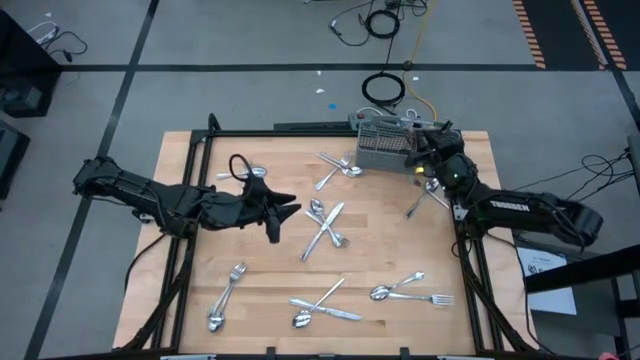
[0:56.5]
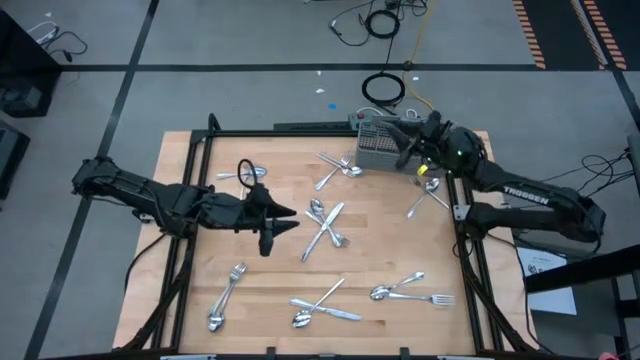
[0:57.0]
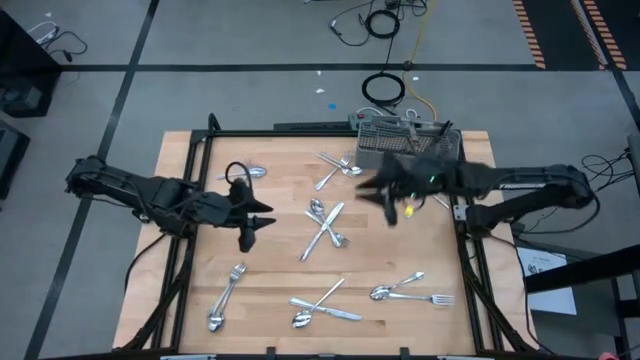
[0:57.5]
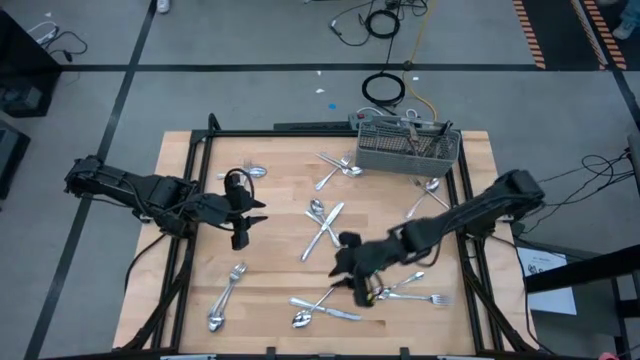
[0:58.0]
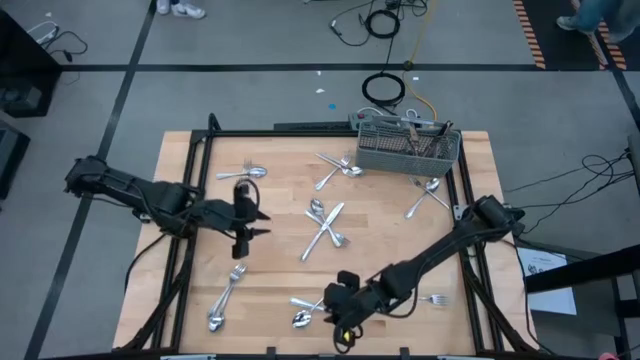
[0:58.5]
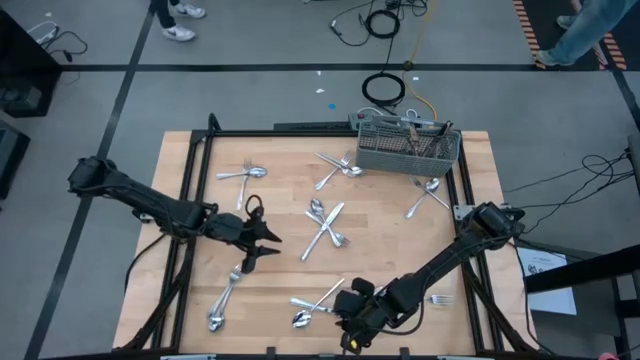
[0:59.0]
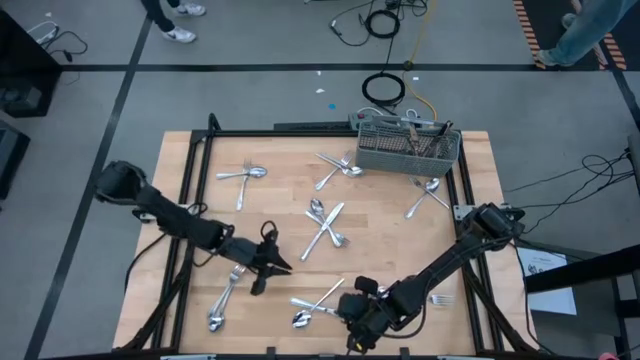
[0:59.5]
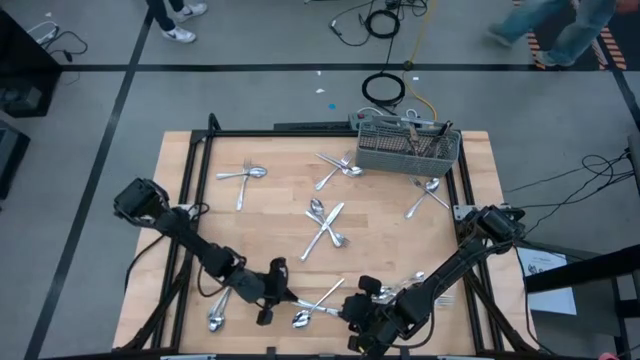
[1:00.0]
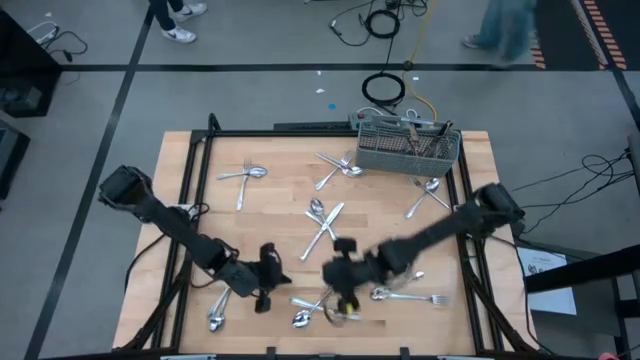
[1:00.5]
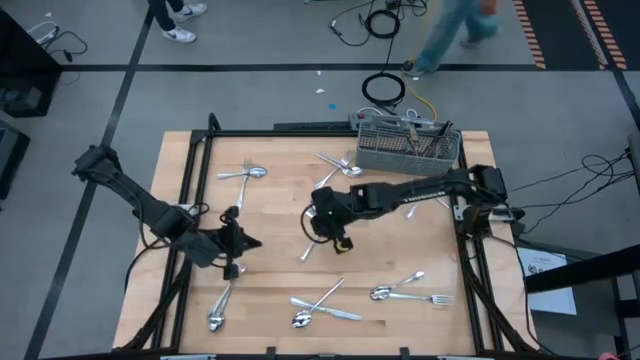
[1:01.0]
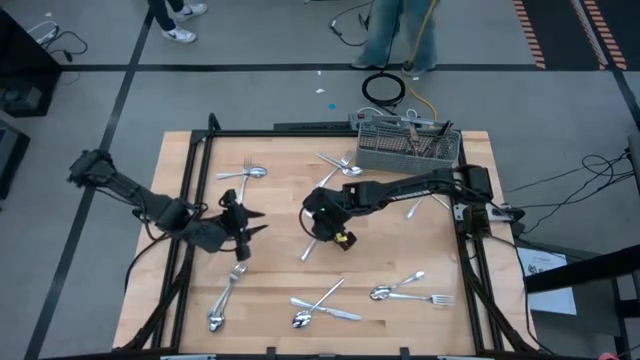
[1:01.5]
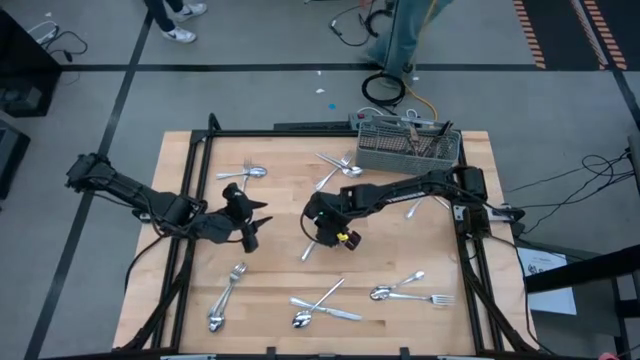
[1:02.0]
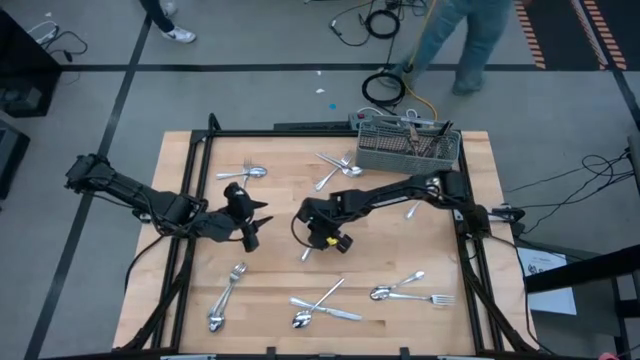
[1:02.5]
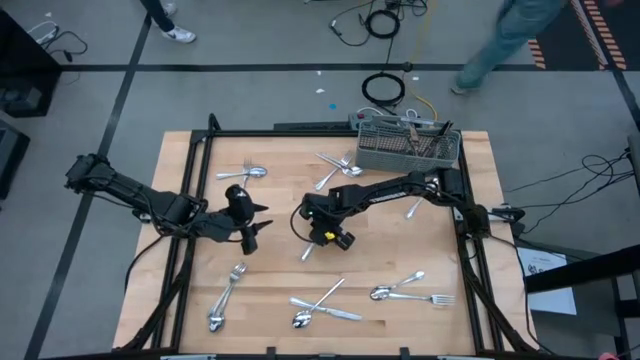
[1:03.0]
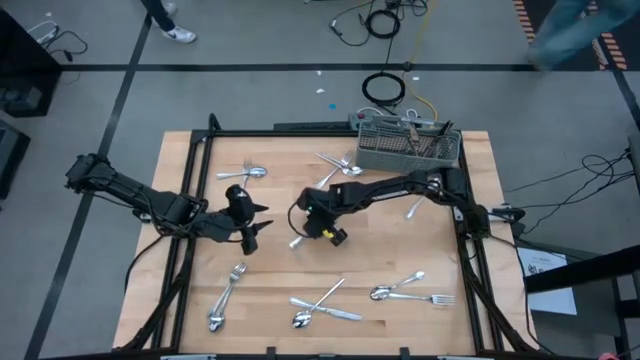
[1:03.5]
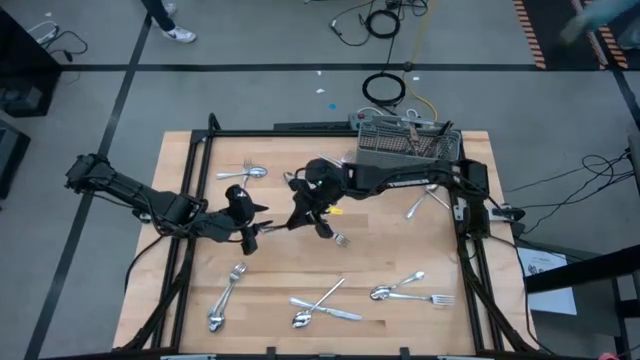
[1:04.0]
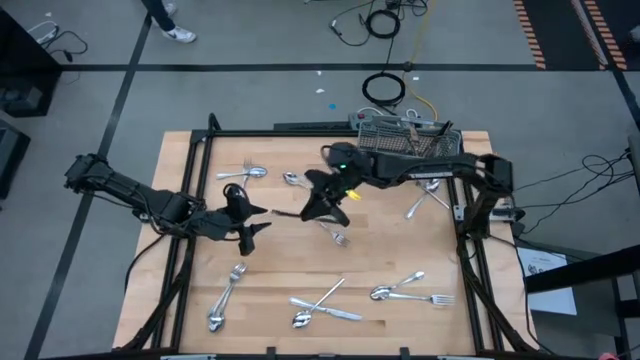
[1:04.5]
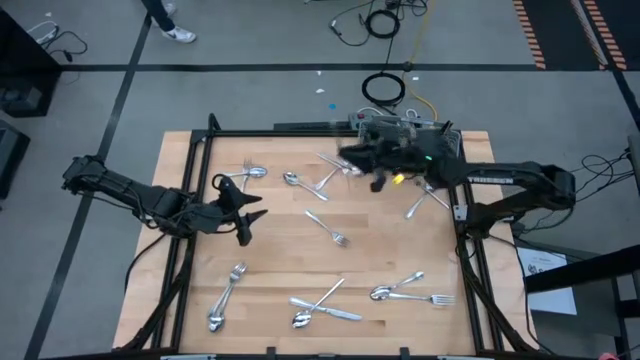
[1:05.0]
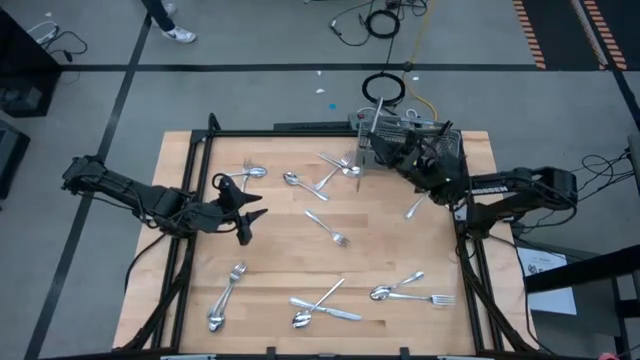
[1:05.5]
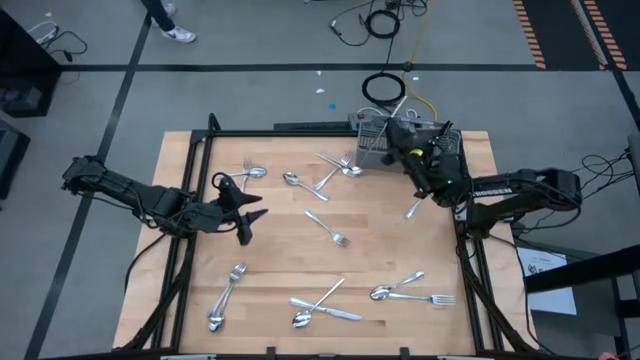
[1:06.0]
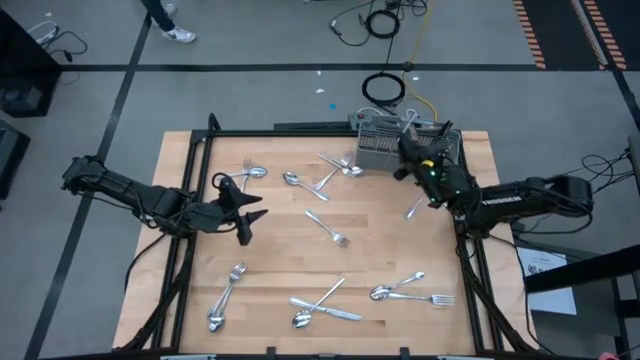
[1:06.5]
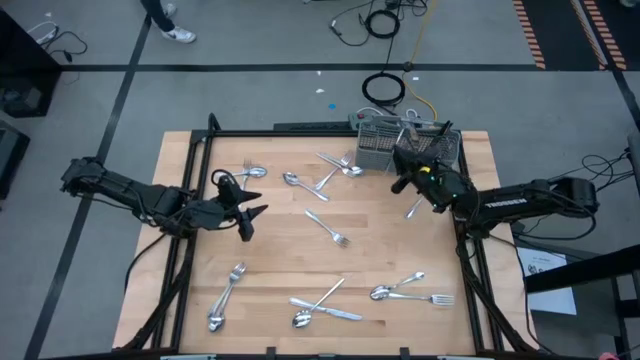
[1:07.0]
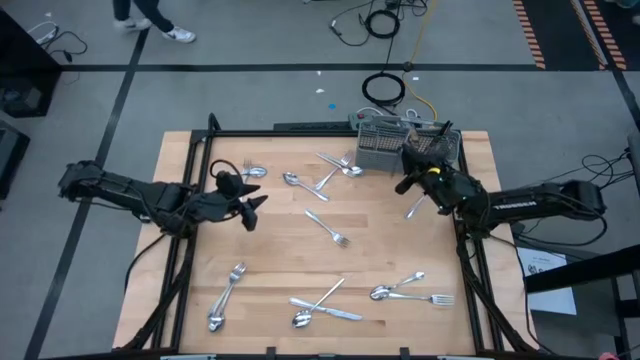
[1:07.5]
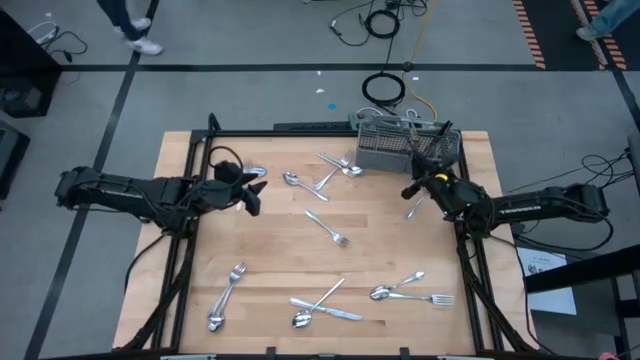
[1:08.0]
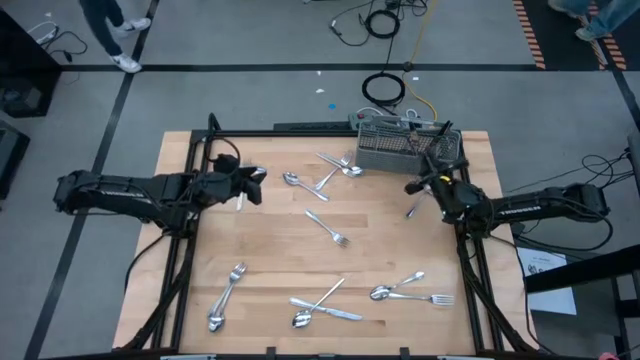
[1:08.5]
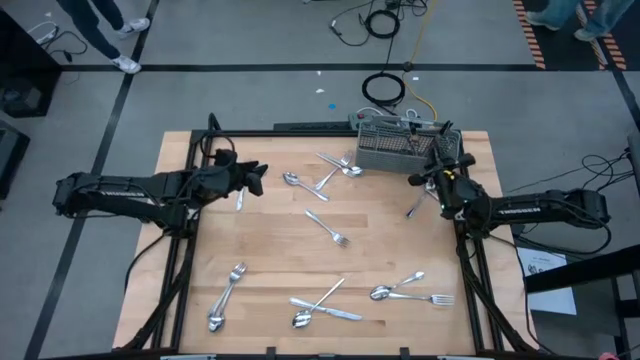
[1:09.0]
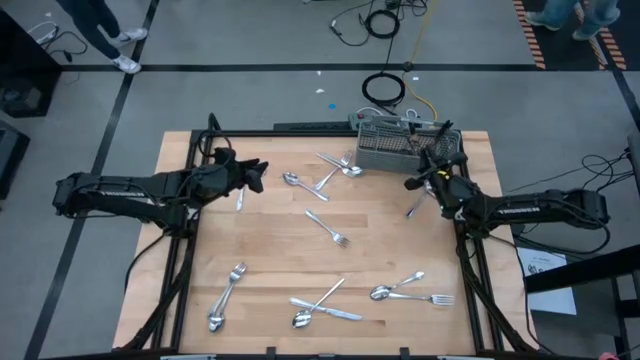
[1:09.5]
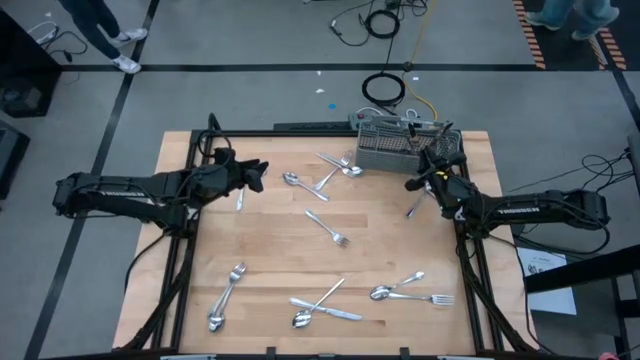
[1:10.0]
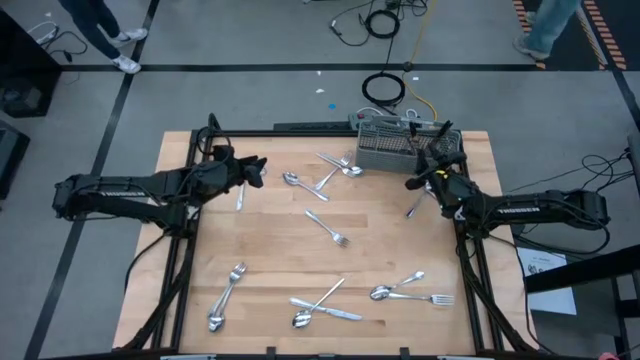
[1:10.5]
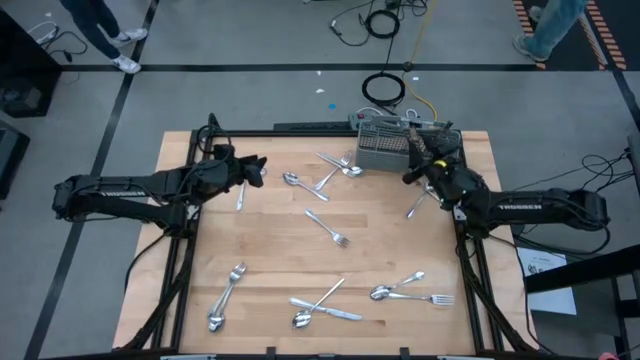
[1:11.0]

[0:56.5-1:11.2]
Task: Sort silverware
Put the silver table knife into the gray utensil holder

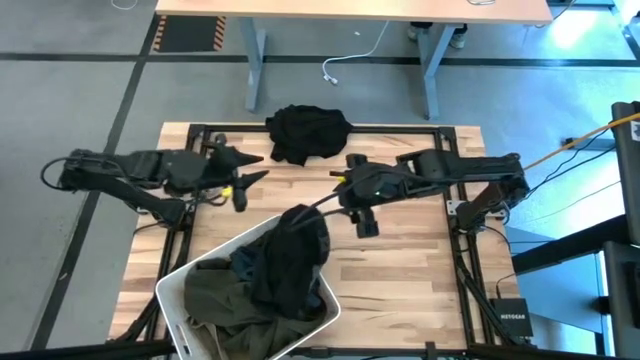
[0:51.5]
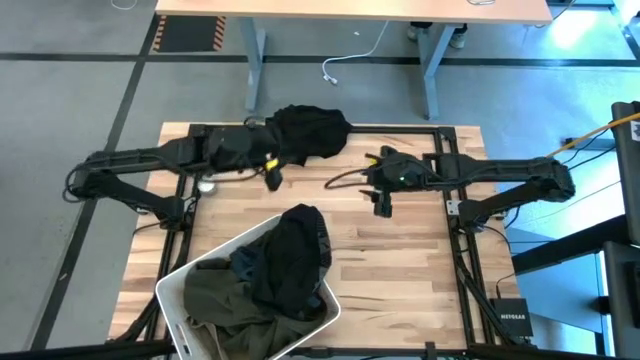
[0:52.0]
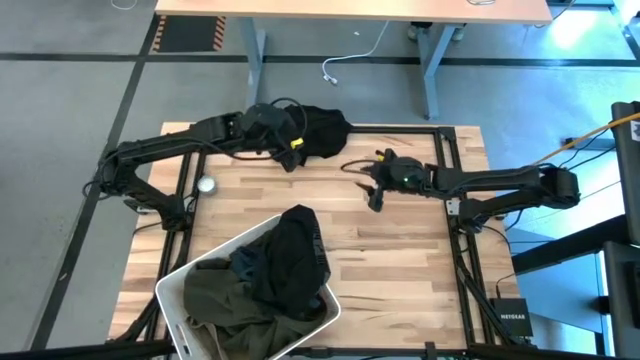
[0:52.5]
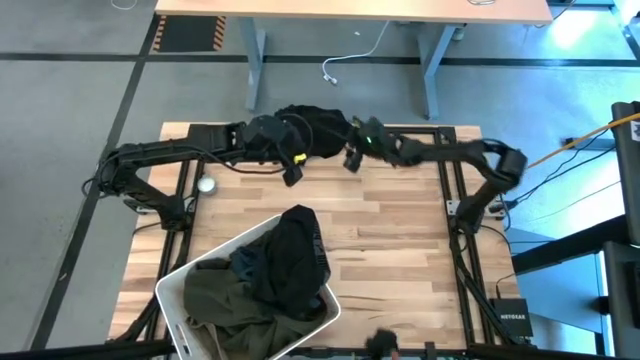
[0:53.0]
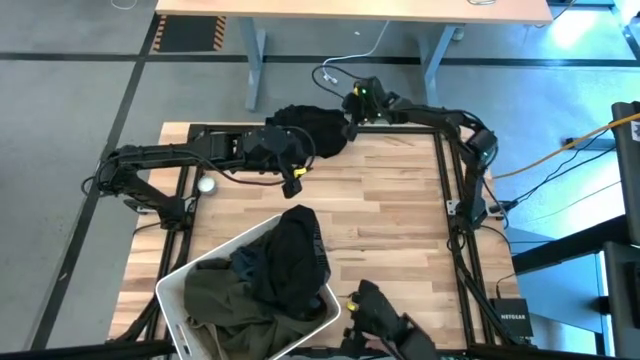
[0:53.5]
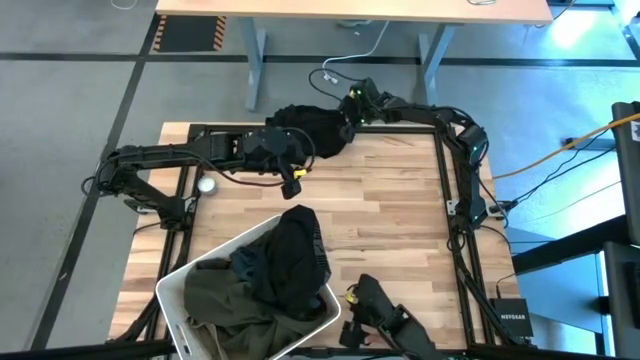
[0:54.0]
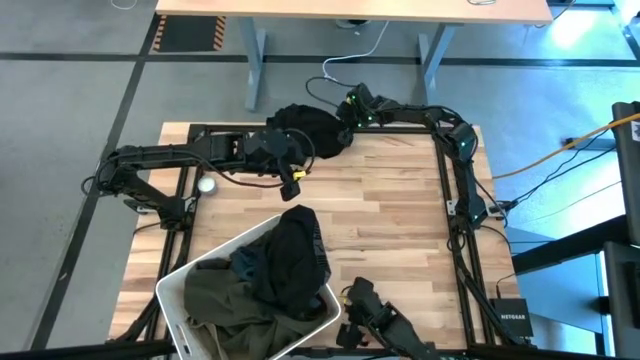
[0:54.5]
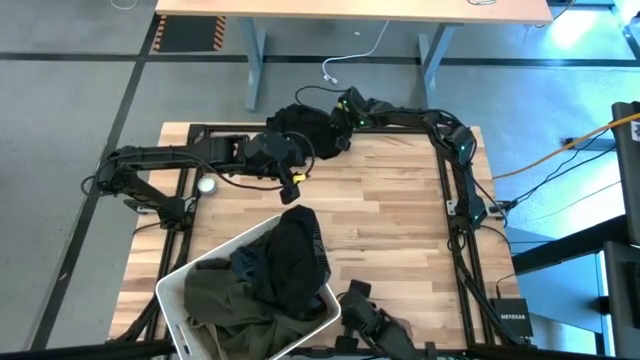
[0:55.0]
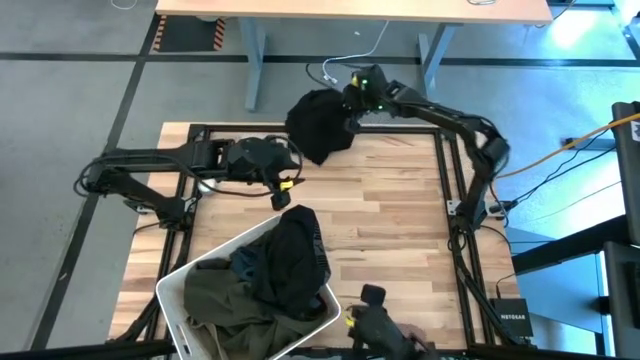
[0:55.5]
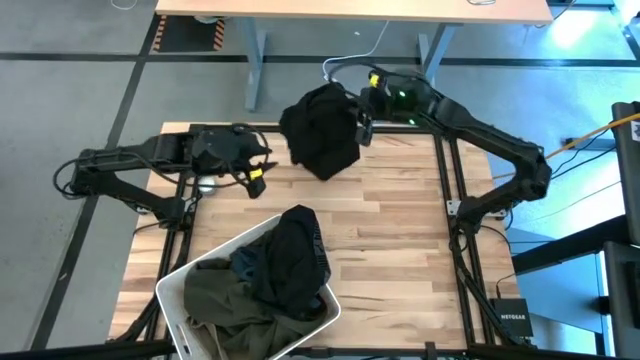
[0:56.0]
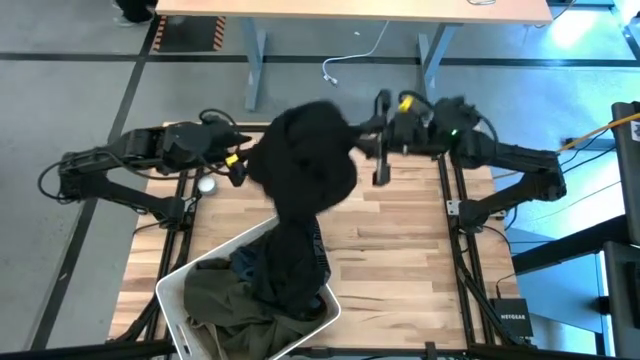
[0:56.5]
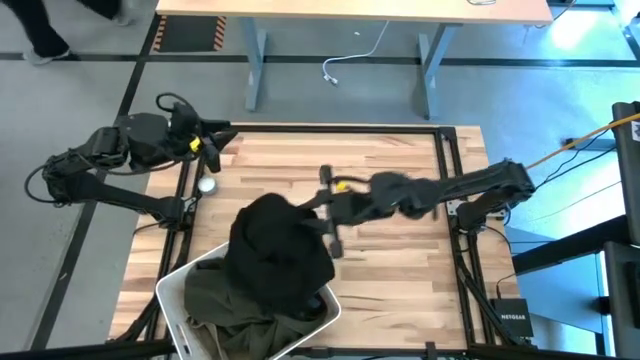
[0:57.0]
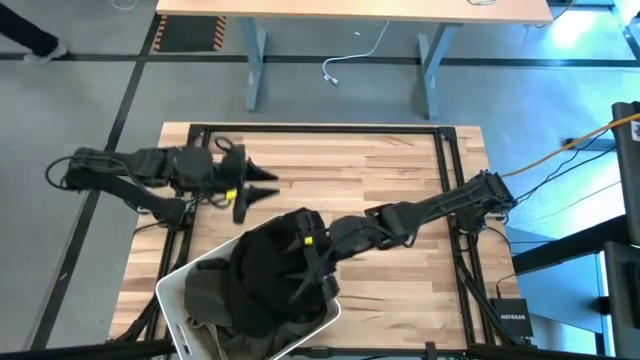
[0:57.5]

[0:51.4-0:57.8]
Task: Sort clothes
Put the black shirt into the white bin
